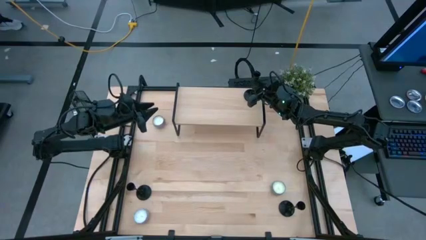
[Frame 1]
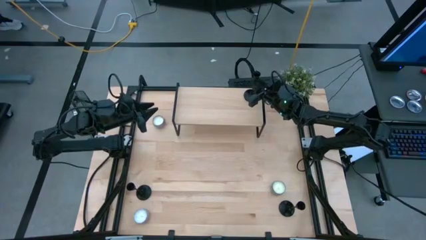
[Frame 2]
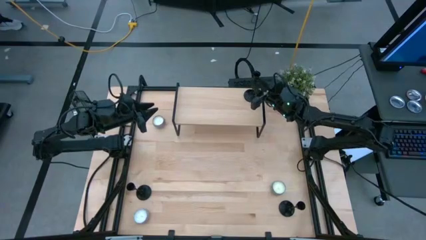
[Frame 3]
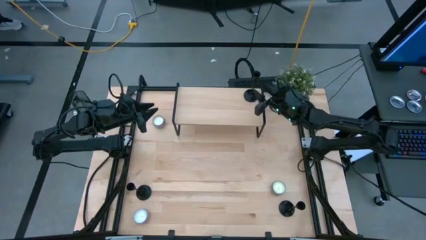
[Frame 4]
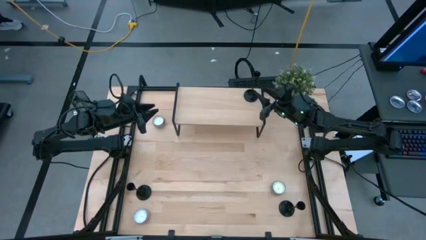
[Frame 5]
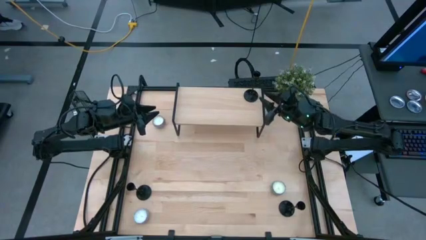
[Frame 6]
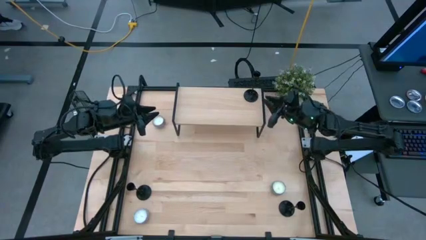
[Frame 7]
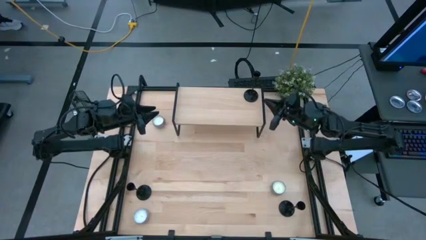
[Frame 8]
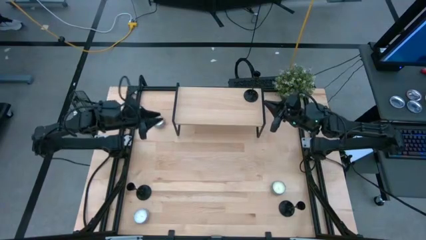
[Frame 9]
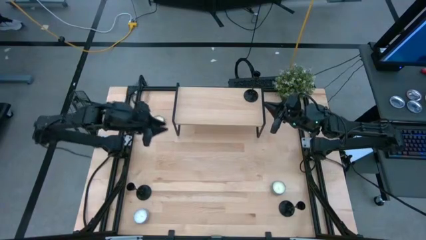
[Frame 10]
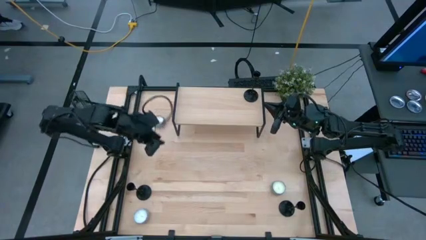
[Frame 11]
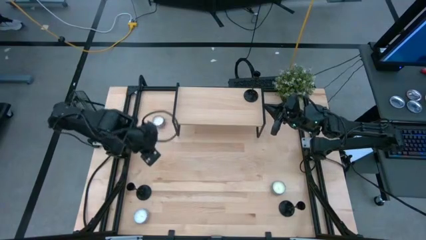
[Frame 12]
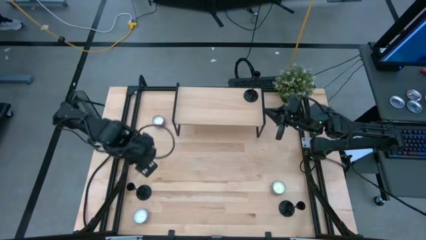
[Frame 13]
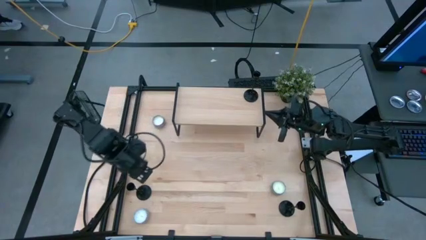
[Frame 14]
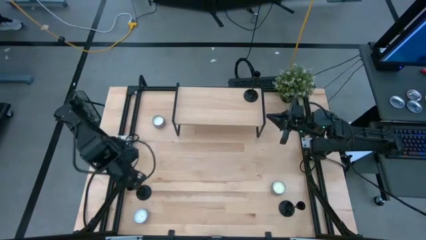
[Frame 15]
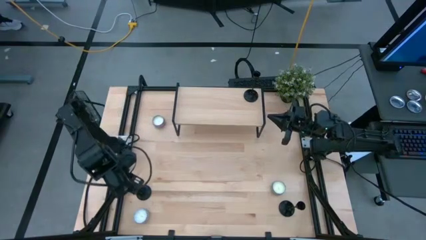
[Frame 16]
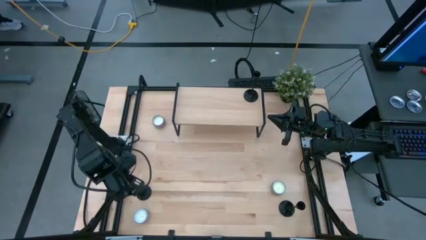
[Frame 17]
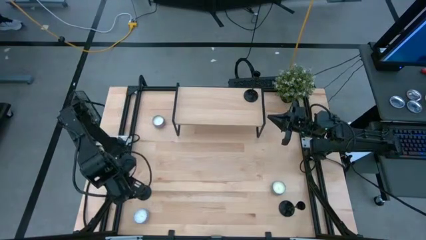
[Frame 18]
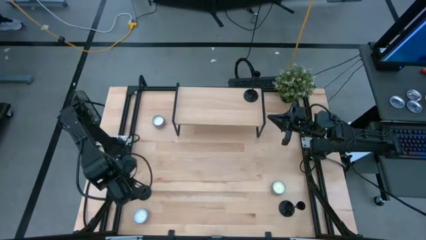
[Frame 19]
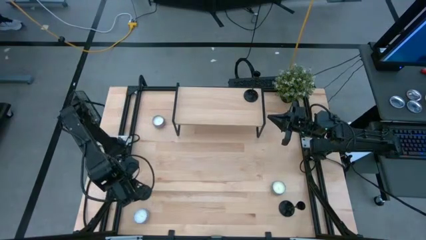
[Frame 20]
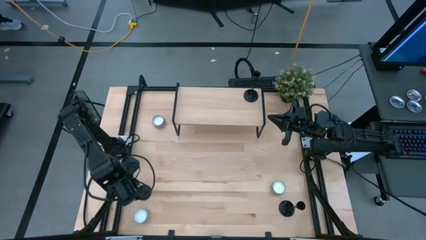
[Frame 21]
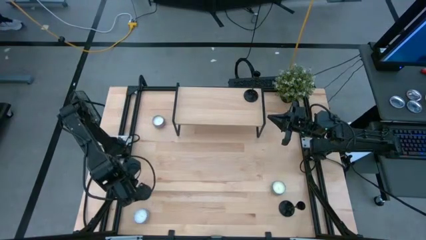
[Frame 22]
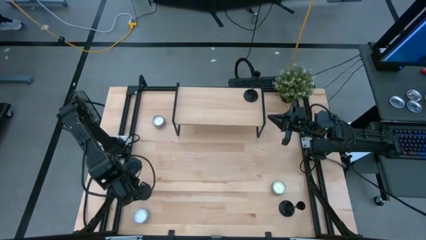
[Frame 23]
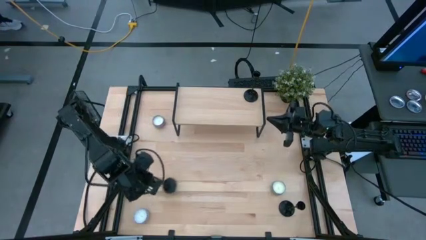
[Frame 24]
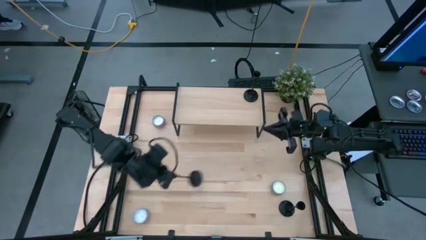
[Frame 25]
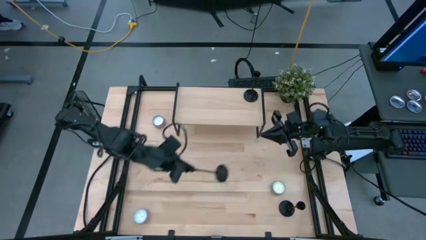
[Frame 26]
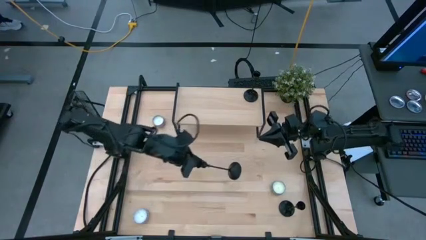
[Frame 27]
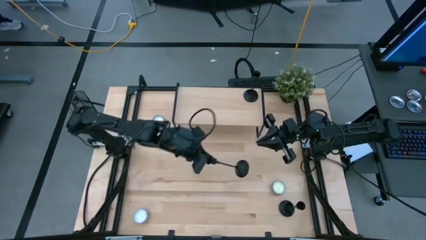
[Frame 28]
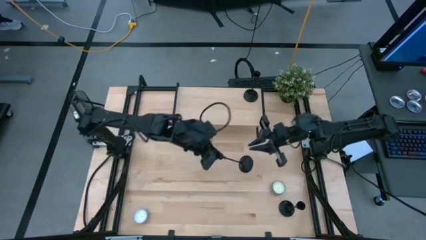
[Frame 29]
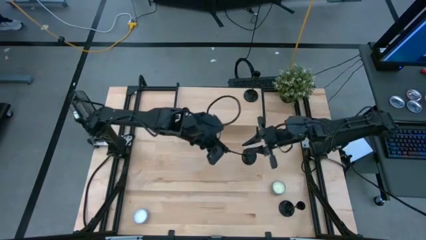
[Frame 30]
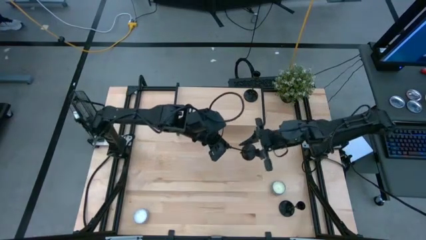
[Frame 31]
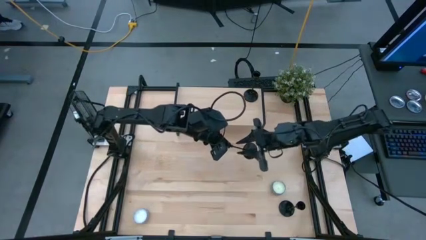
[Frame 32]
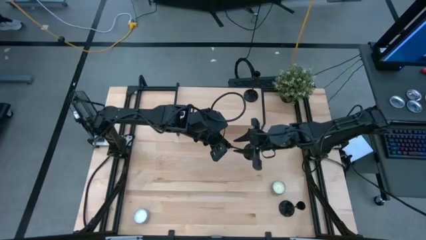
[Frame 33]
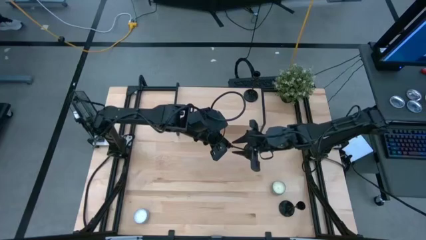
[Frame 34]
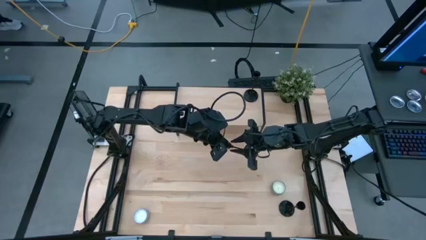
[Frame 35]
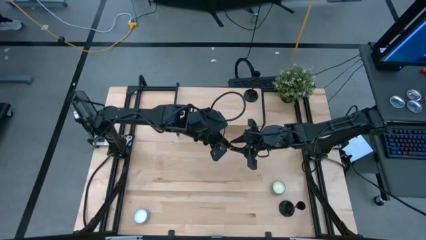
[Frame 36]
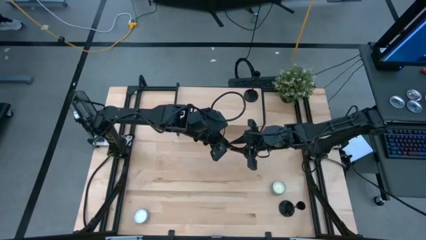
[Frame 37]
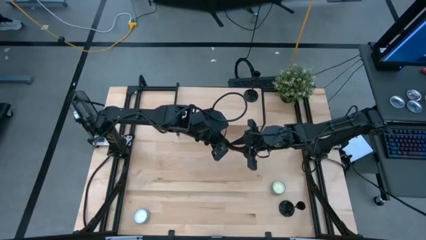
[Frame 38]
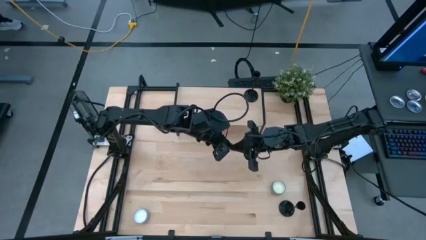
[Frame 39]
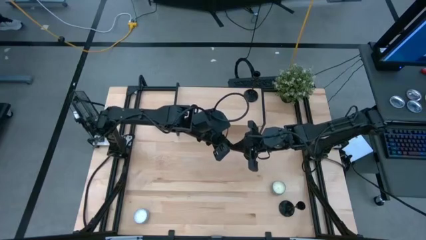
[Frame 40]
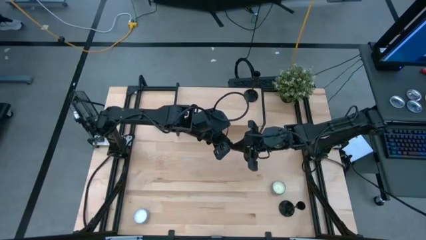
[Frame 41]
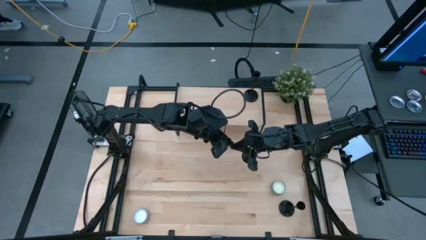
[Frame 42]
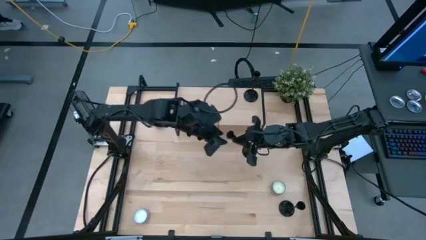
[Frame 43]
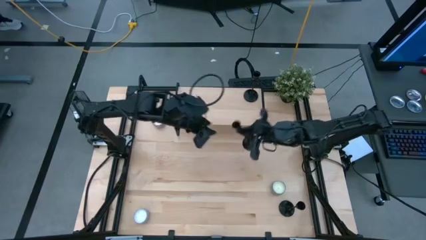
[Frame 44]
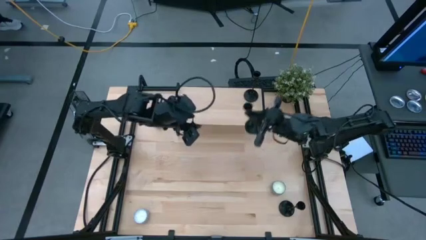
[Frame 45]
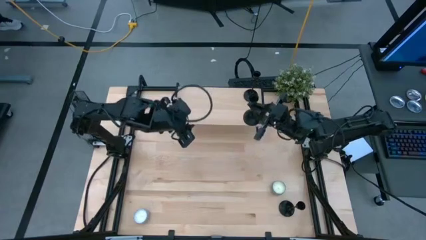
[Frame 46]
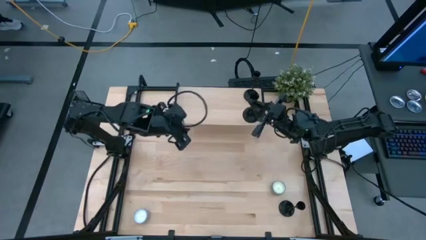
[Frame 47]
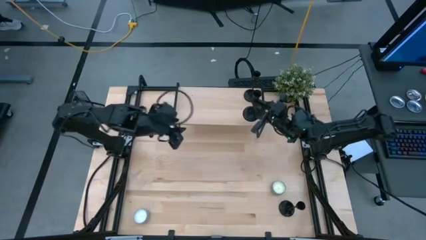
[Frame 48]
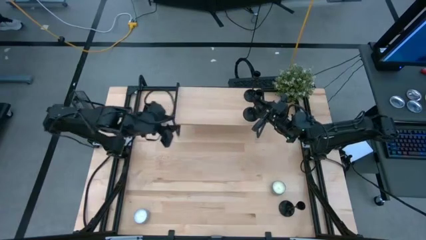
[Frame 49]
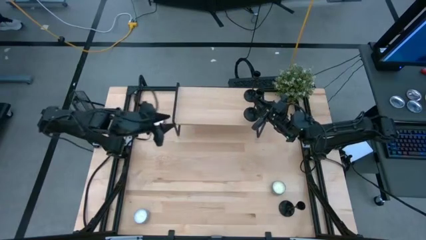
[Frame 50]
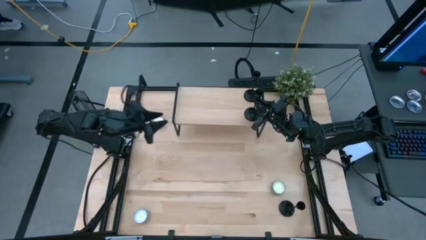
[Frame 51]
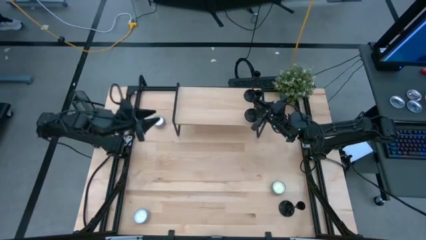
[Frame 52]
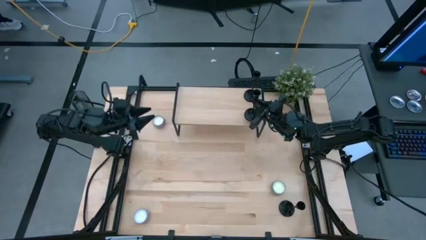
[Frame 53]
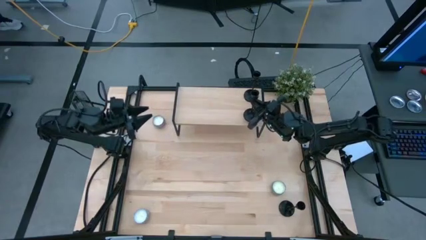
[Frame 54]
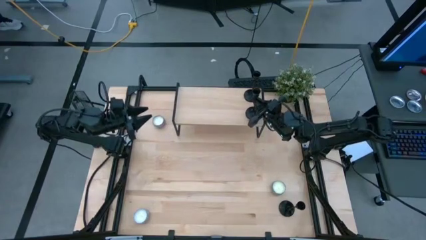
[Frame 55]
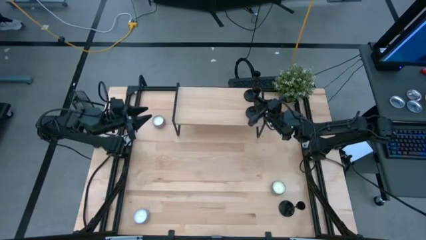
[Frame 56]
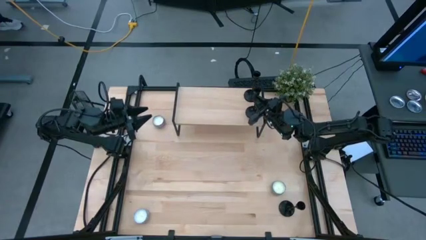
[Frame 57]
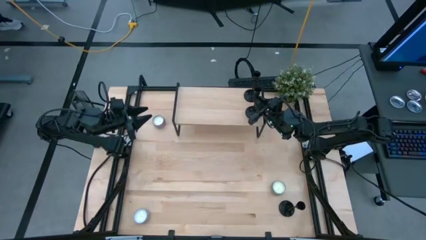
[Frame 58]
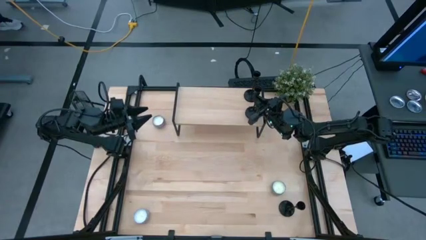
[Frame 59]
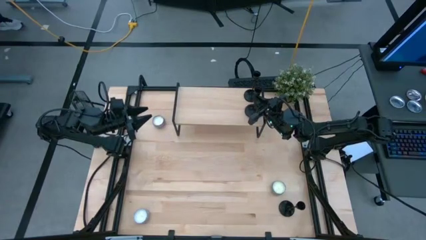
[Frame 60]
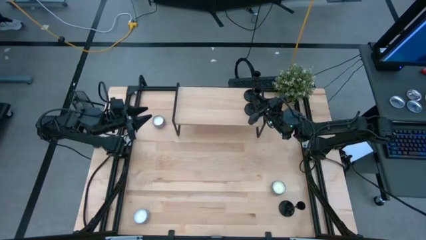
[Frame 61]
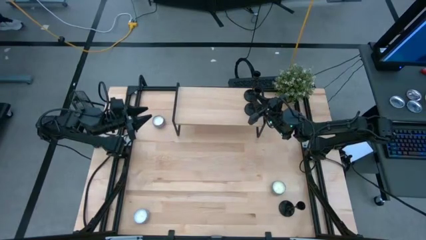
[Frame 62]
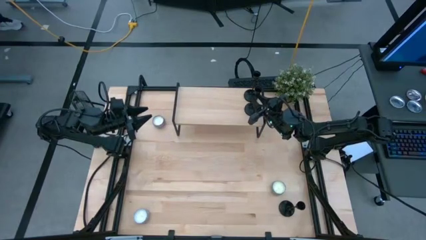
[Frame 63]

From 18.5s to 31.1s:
Task: Pick & Place candle stick holders
Put the left black candle holder on the shelf

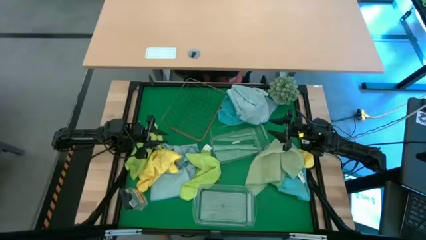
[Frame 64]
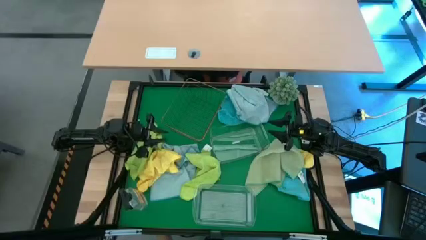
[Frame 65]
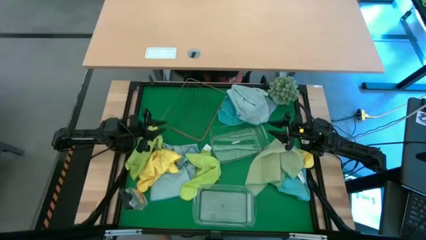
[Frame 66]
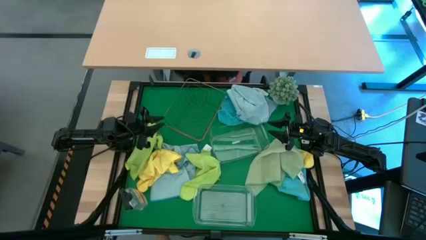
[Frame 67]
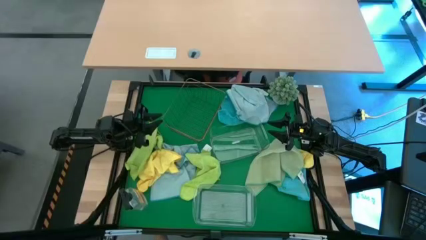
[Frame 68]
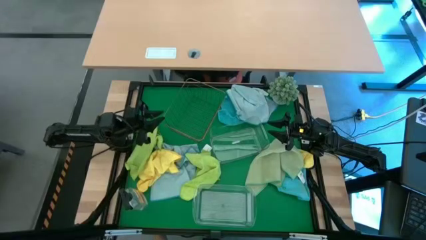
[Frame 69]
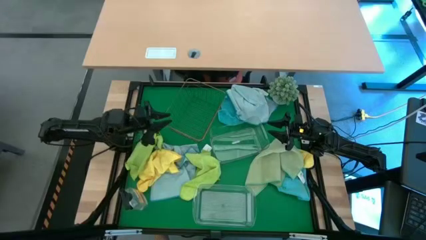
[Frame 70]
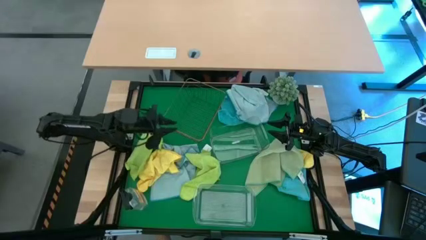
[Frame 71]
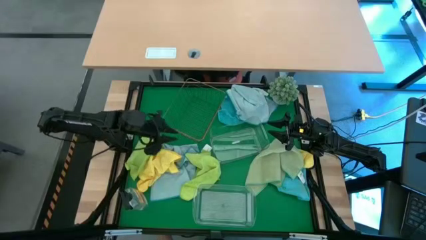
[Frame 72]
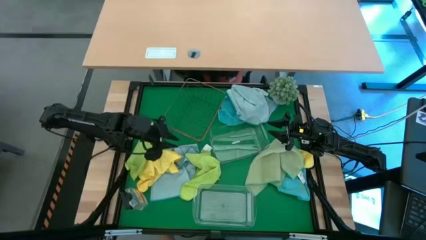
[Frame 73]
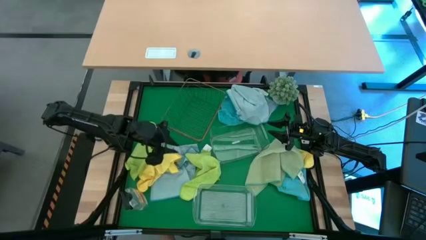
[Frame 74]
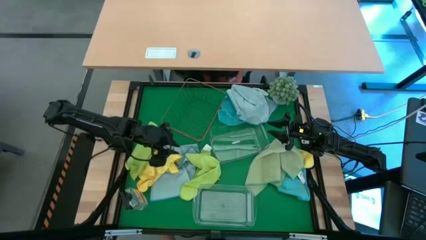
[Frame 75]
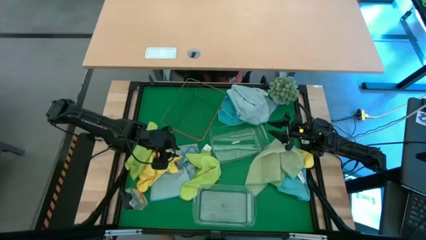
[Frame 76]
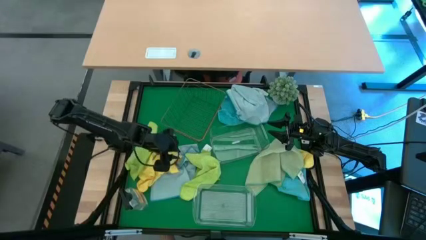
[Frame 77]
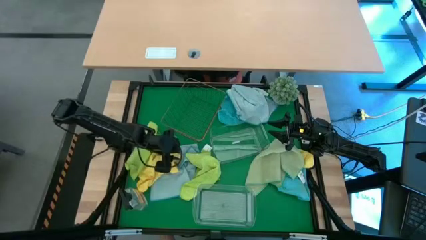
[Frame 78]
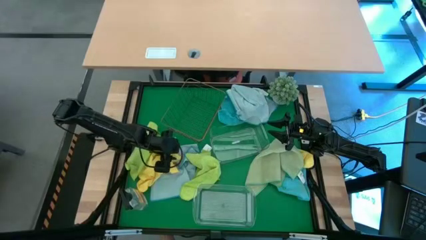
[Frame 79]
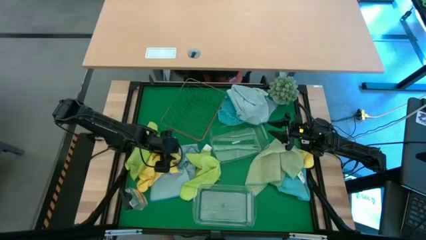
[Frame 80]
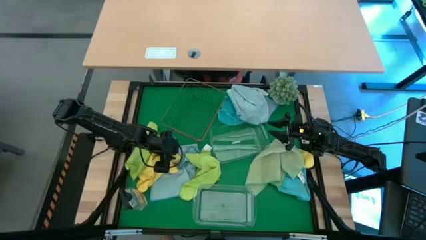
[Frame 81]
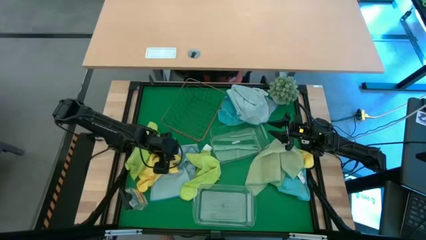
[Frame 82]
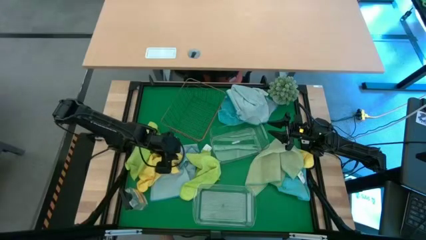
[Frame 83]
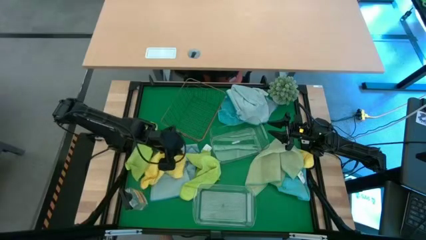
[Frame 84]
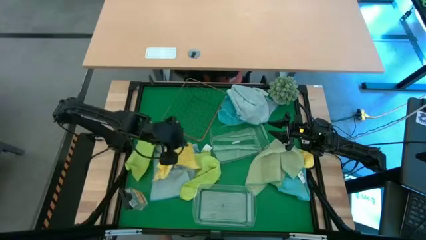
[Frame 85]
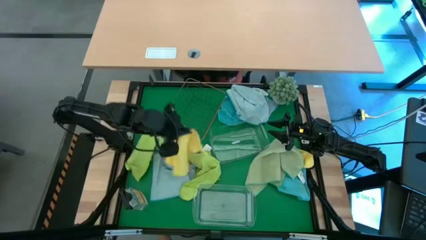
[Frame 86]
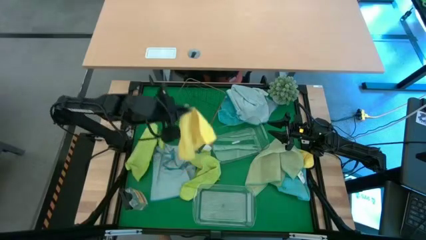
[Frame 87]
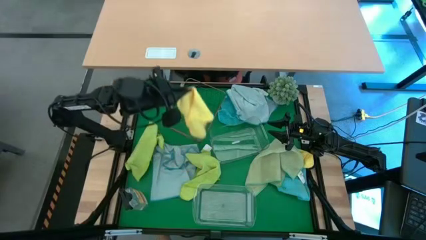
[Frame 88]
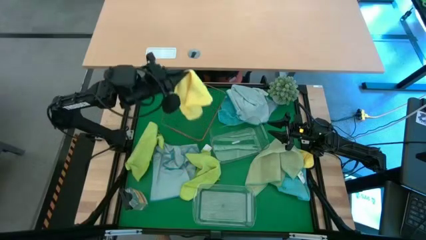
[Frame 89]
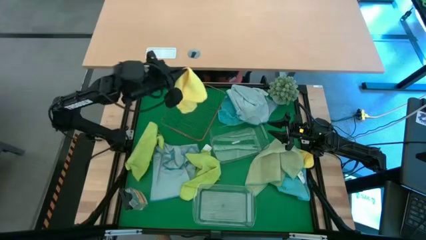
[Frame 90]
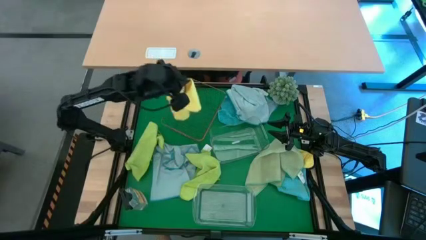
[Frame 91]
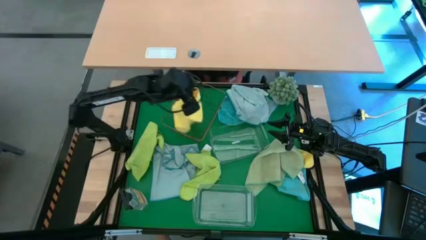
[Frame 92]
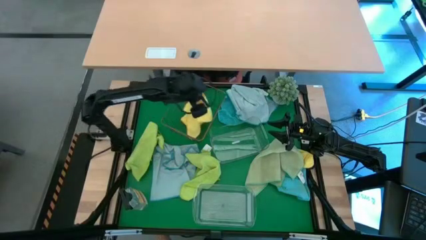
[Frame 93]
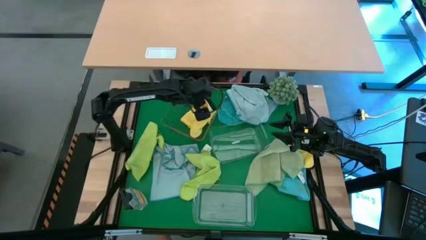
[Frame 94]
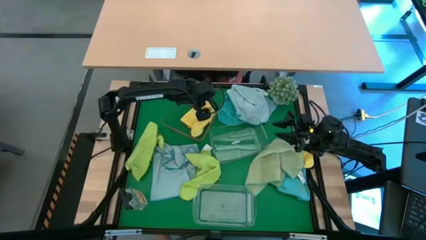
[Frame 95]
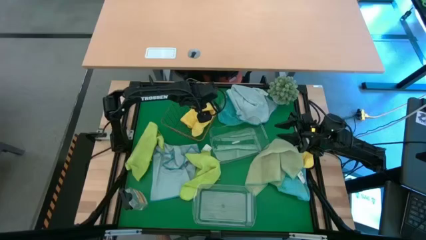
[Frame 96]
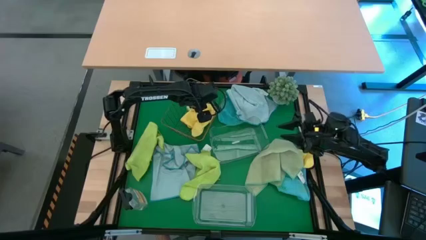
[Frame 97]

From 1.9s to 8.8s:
Task: Sort microfiber towel by color & place in baskets
Put the left yellow towel into the gold wire basket
